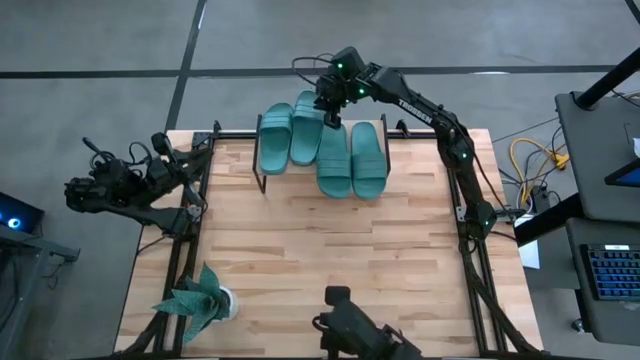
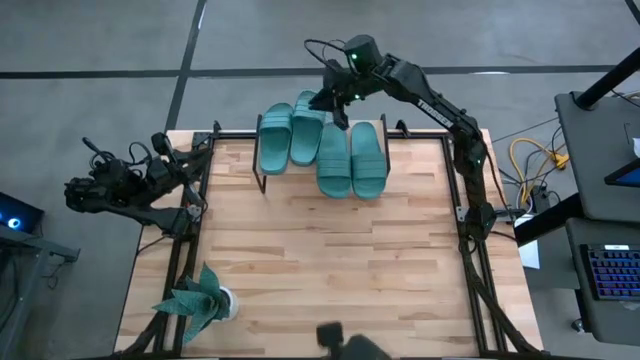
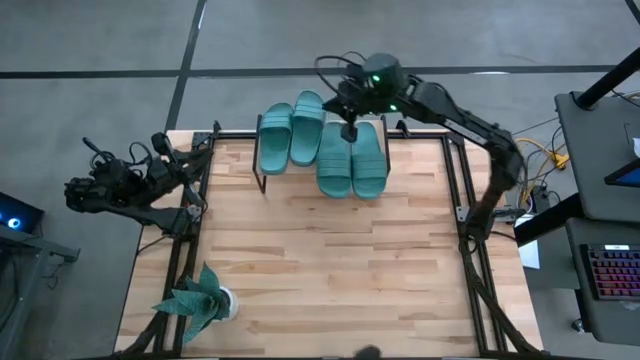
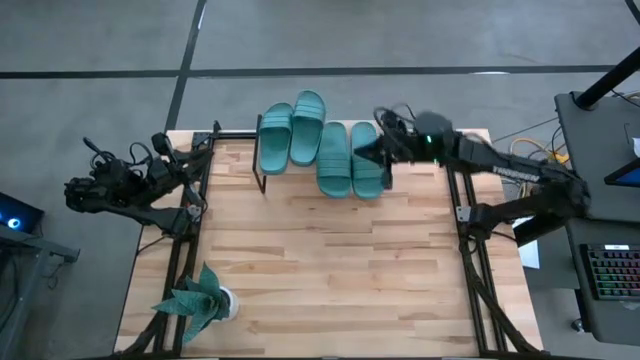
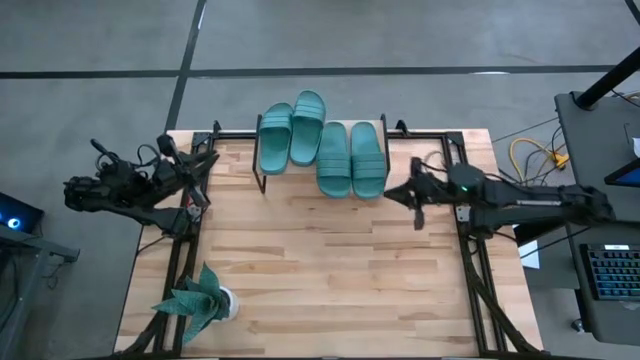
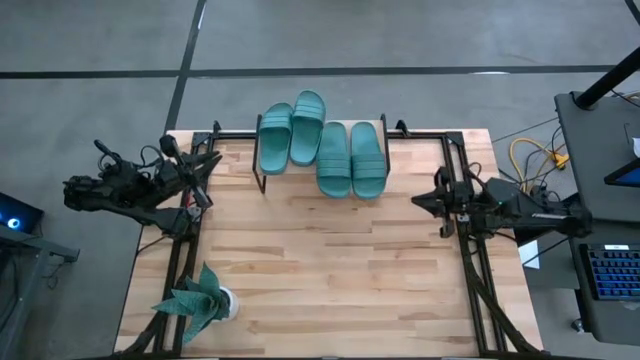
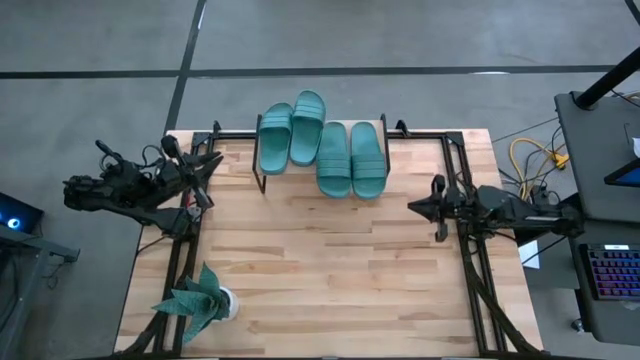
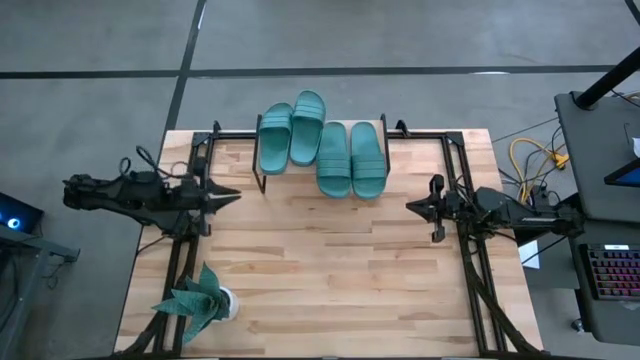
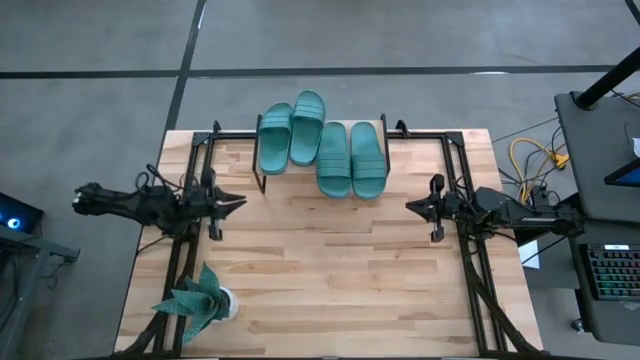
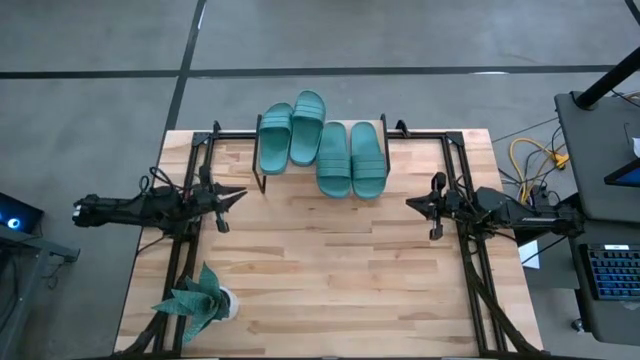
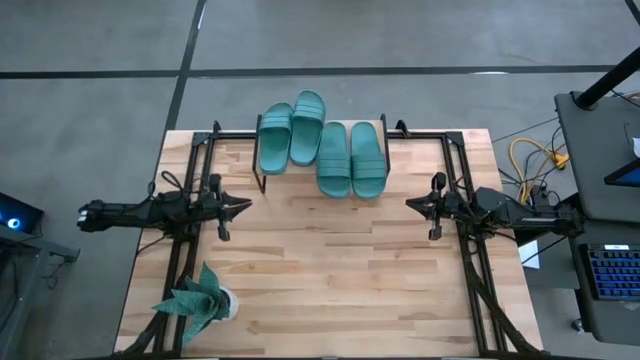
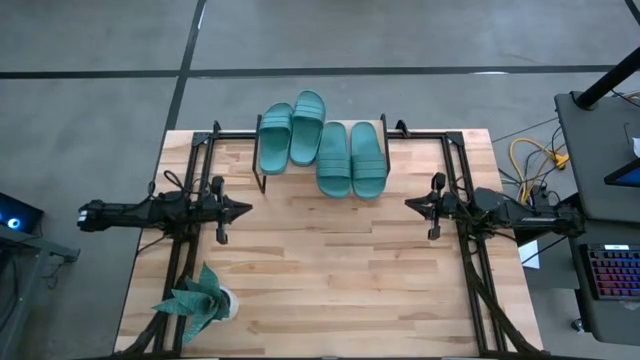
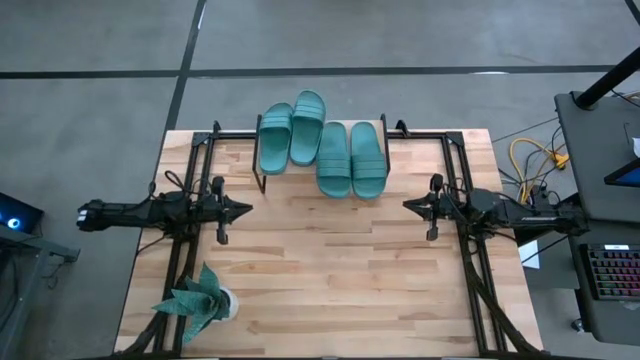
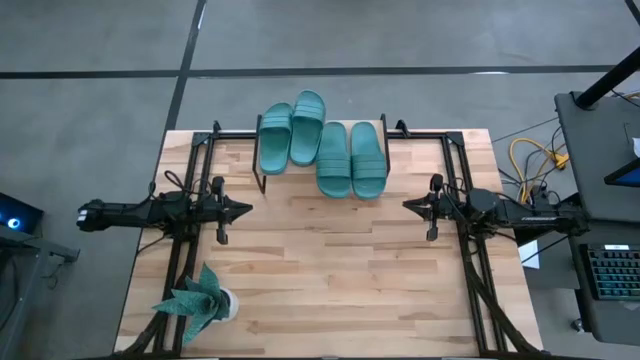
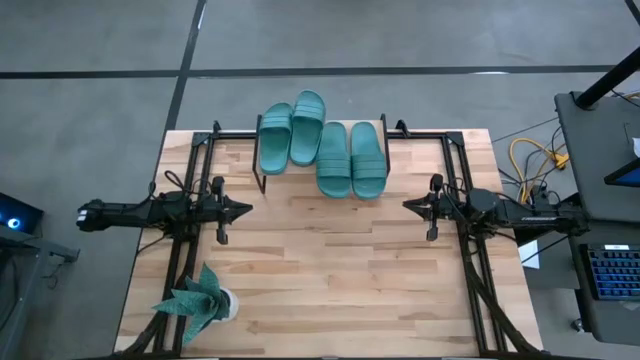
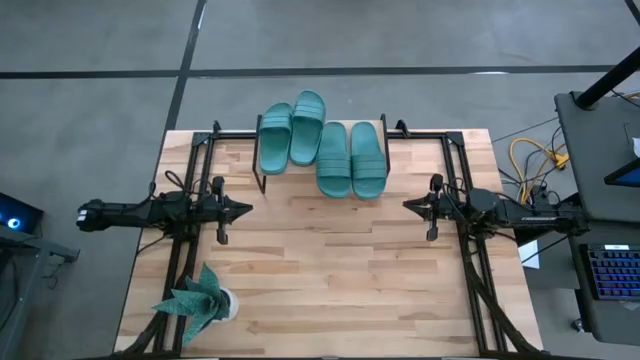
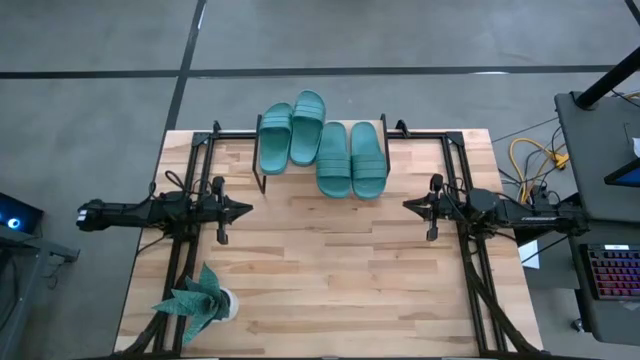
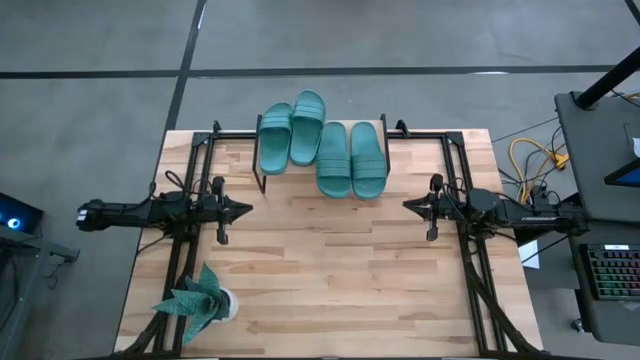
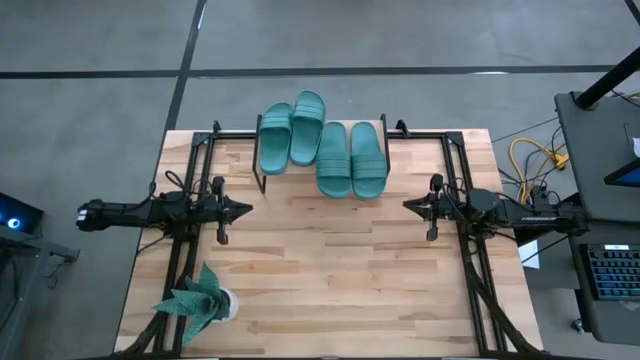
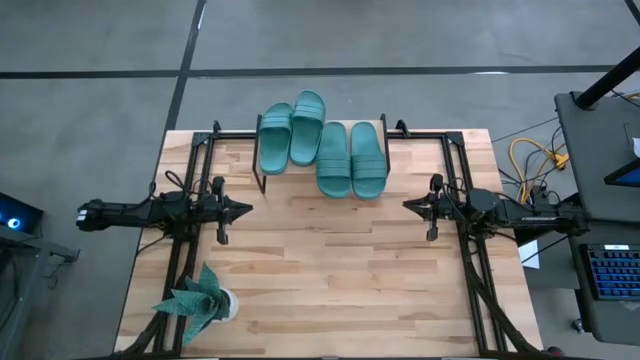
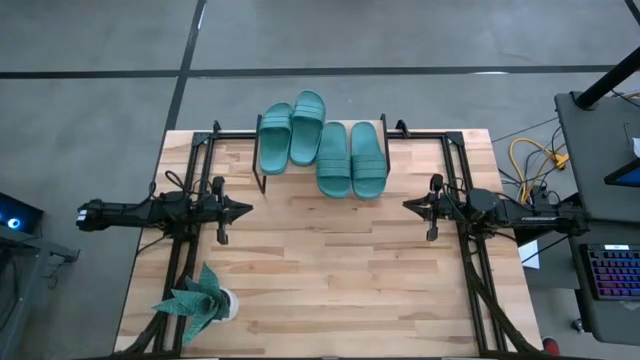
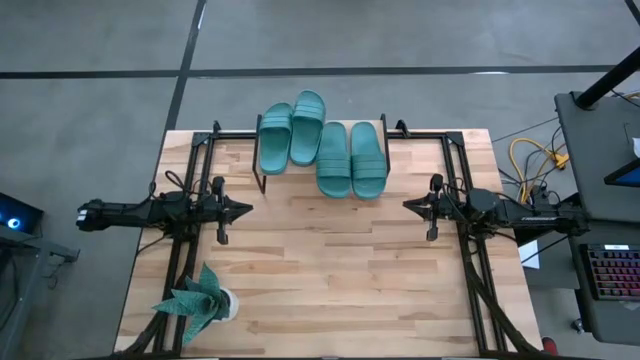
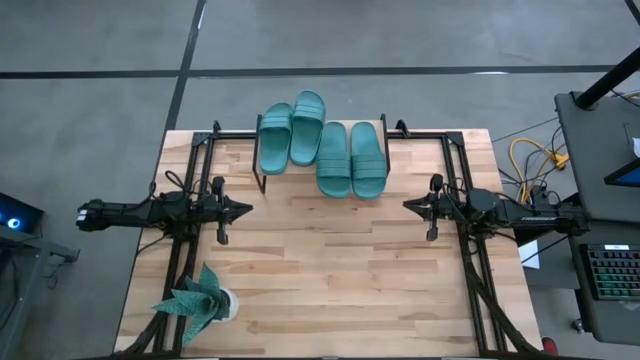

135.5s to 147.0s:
Task: Pick and place slides into the shelf
Return to Home Position

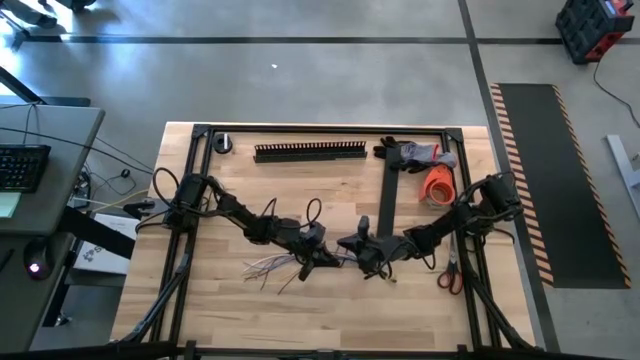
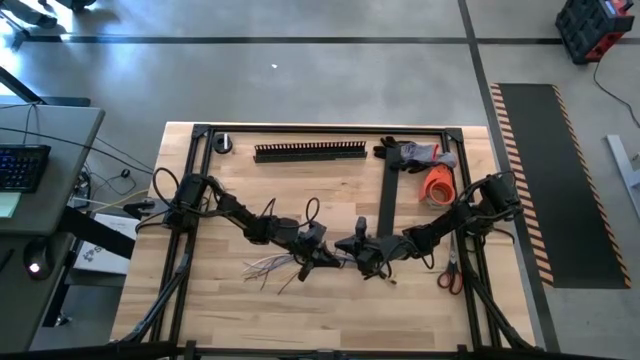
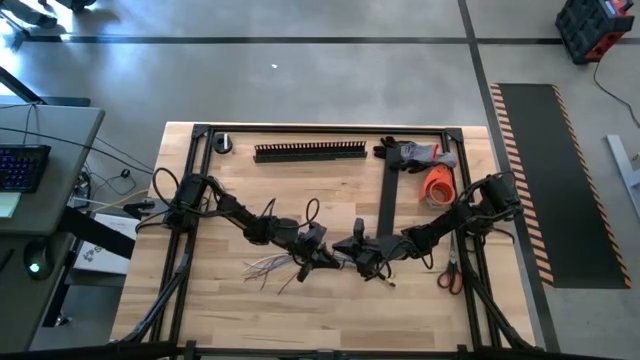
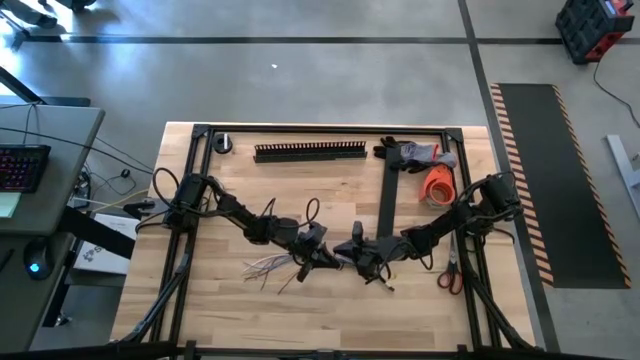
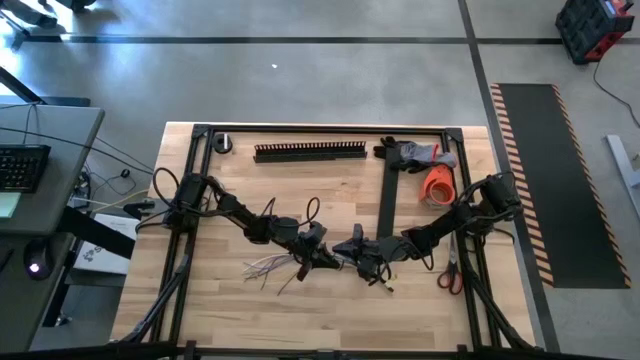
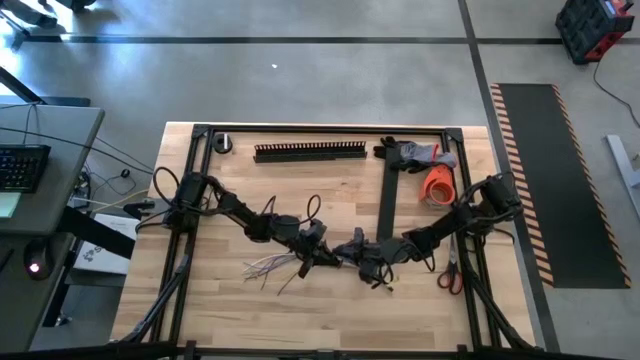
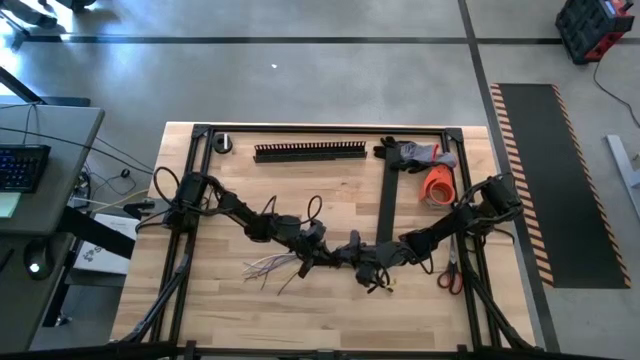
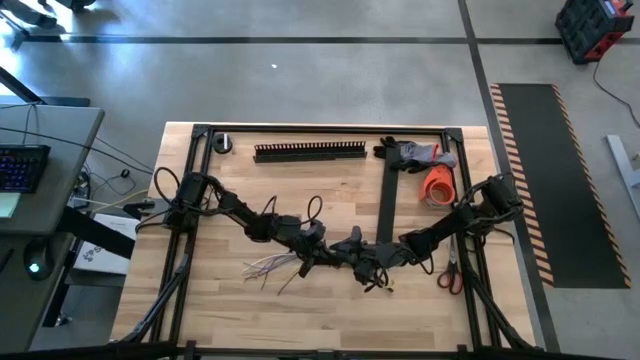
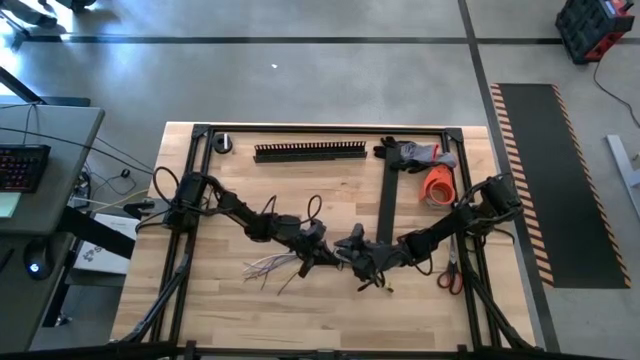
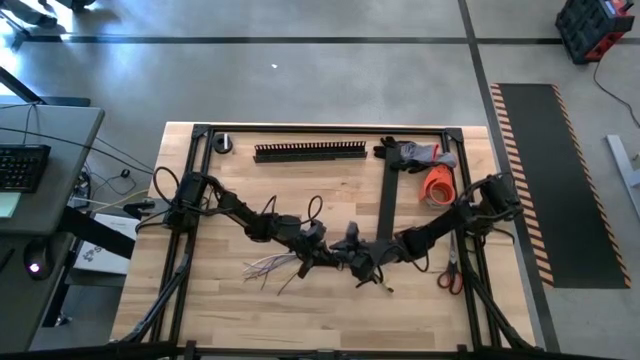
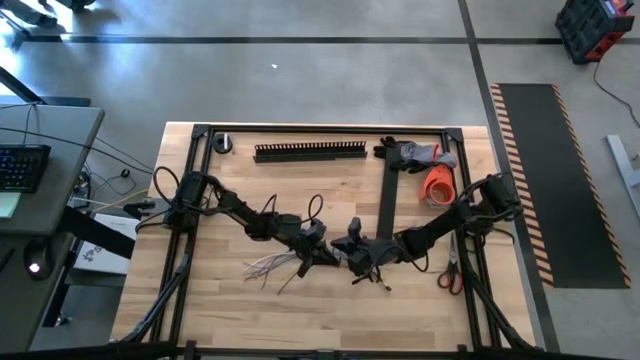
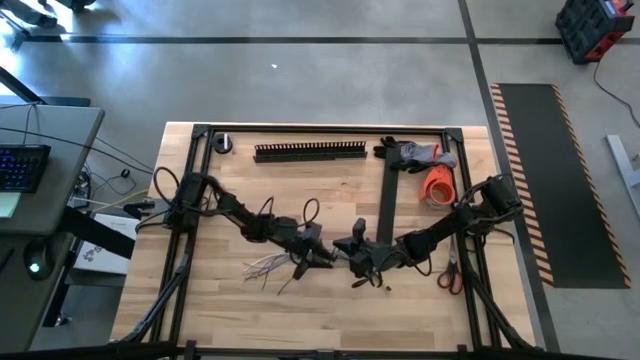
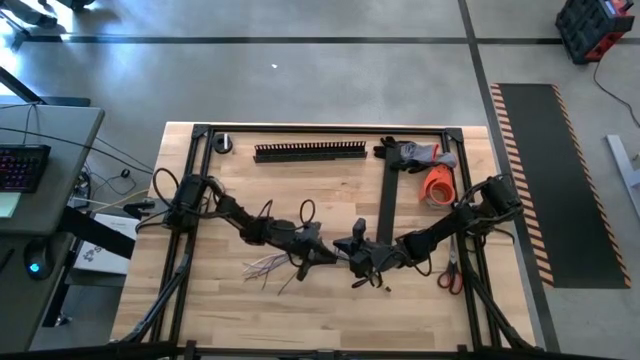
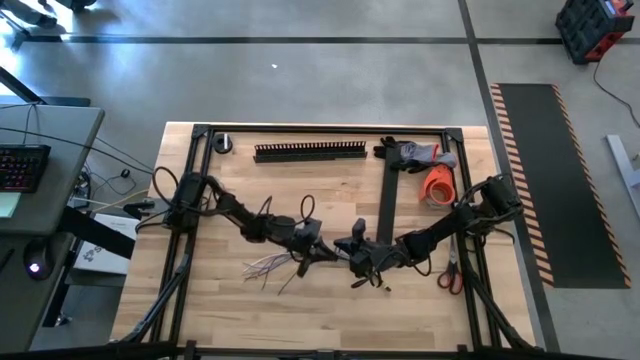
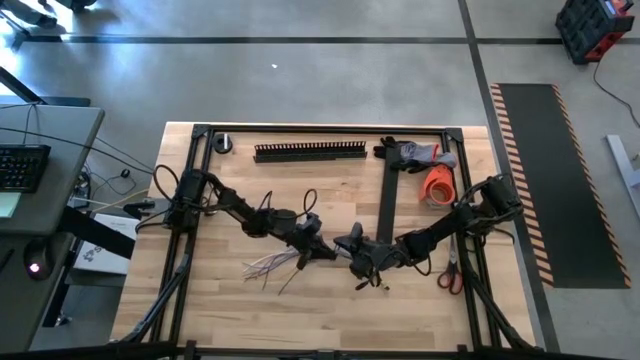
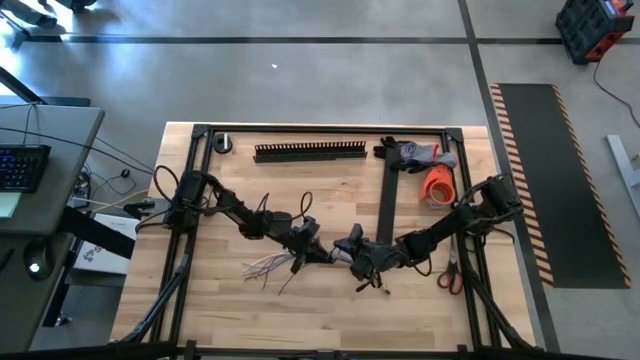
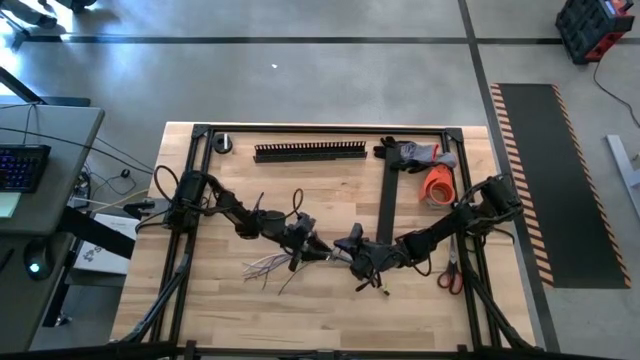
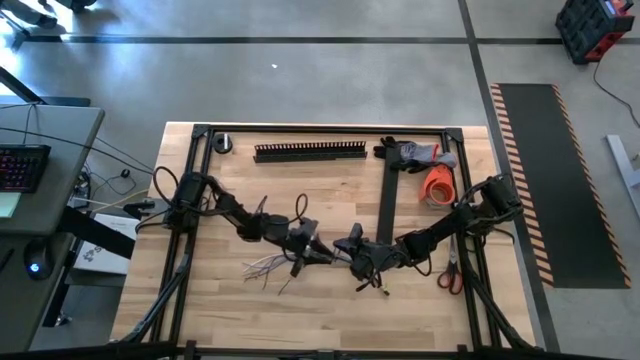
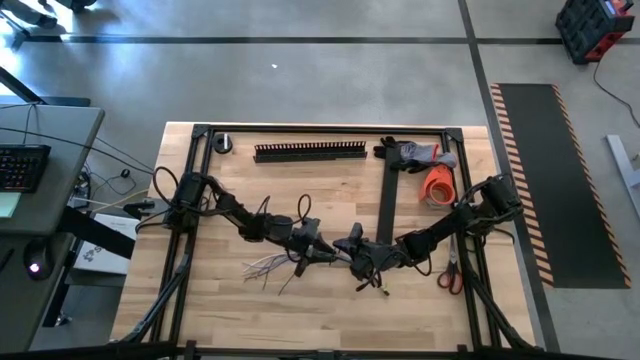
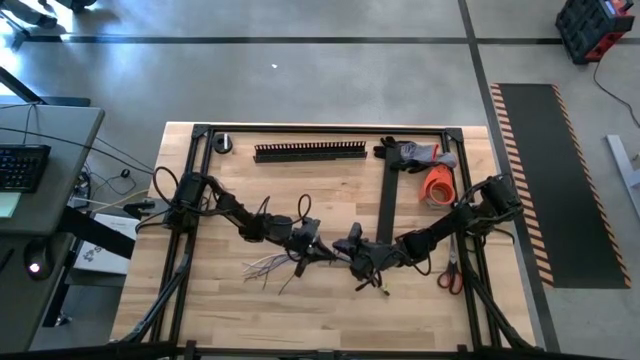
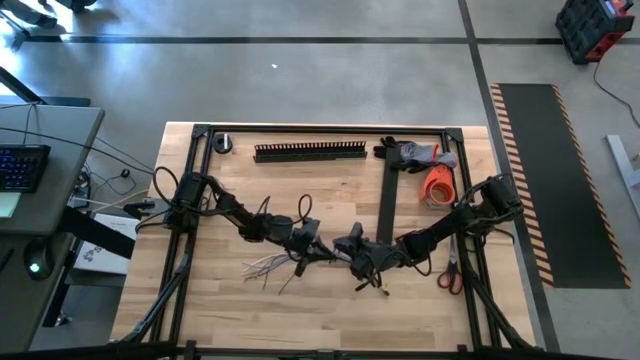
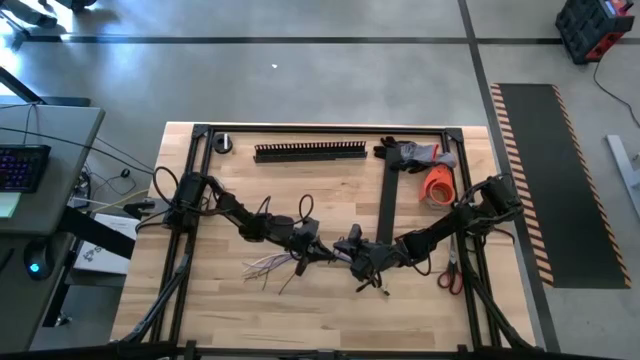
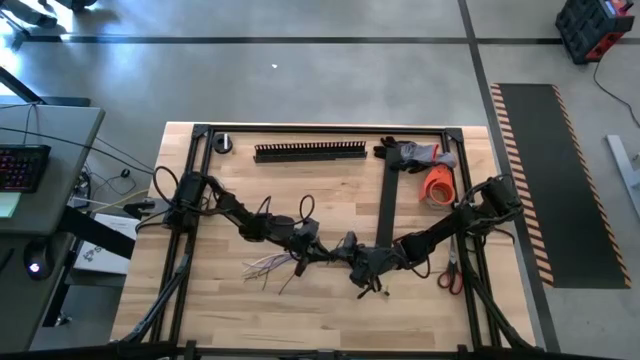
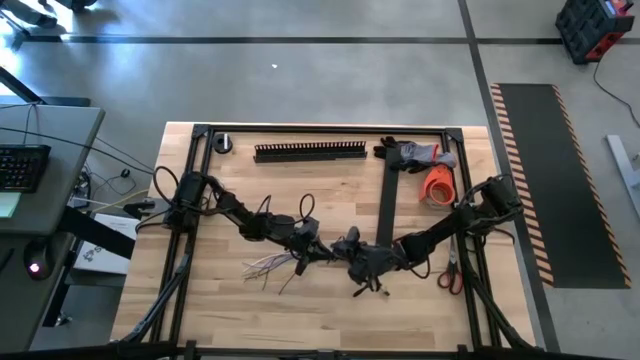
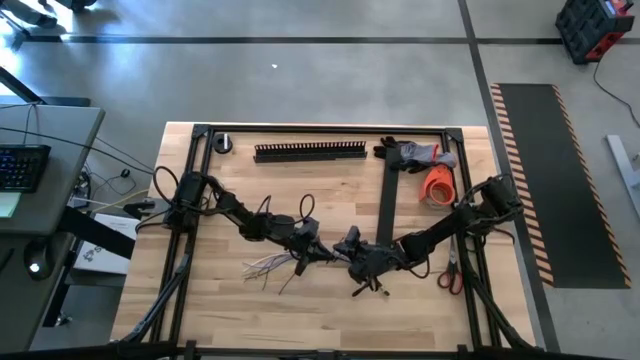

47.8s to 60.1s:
Task: Ziptie cables
Wrap the cable wires using the black zip tie
